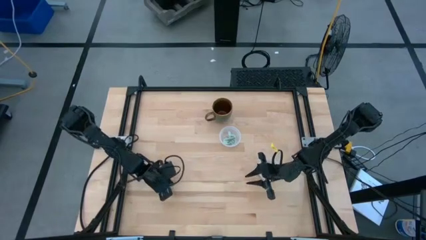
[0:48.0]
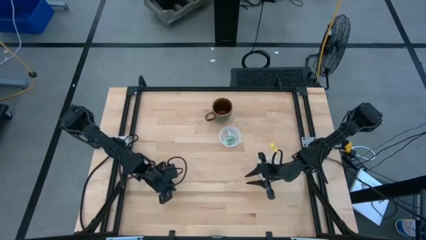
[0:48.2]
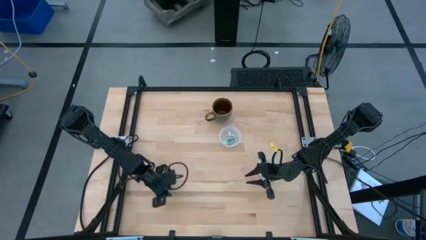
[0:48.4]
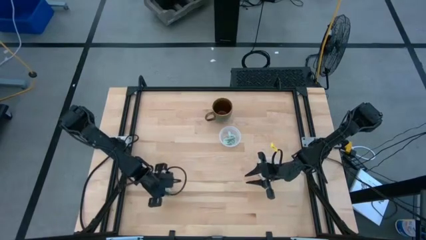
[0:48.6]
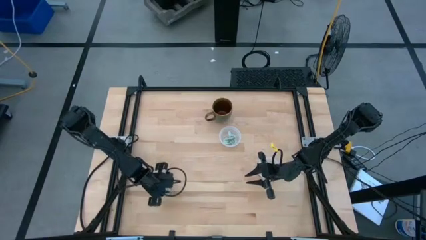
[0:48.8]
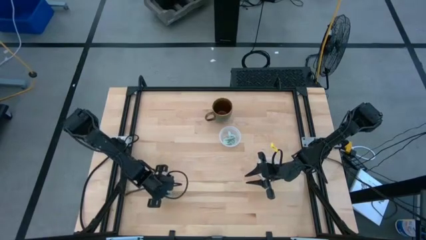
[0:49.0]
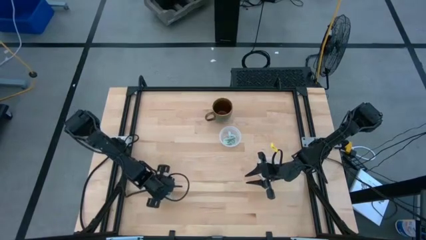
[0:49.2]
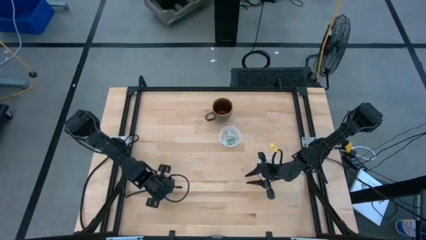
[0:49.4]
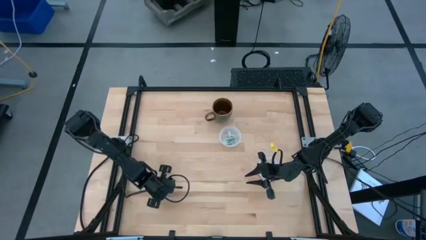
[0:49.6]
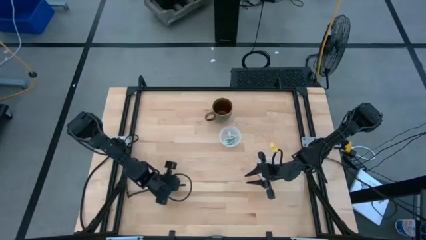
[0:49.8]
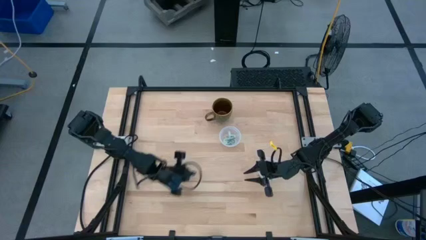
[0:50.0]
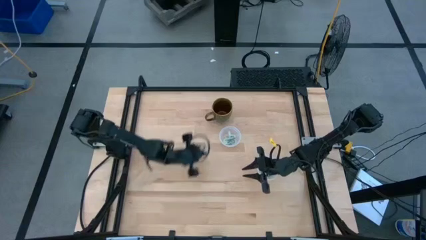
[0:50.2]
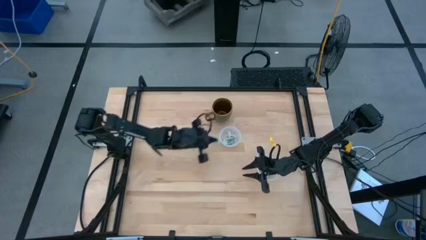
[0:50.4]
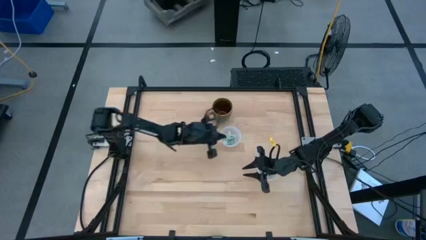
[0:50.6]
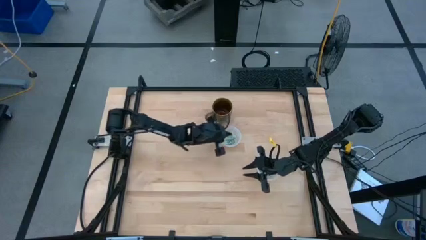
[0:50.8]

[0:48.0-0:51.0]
Task: Pick and place items into bin
Put the stevia packet into the top transparent bin

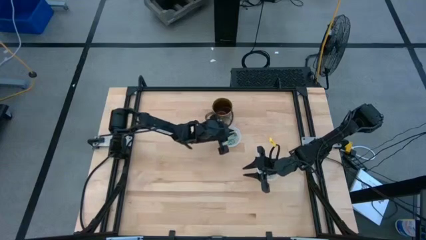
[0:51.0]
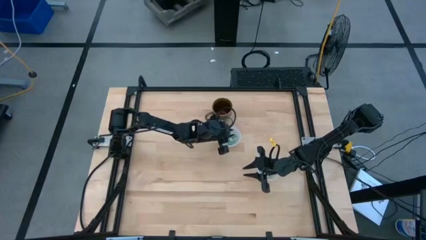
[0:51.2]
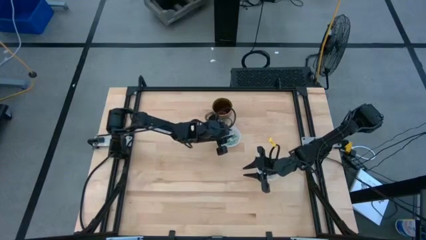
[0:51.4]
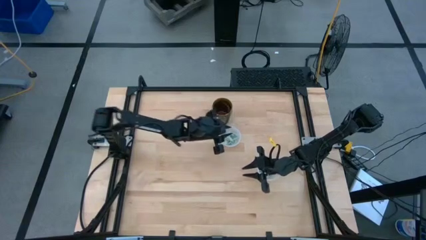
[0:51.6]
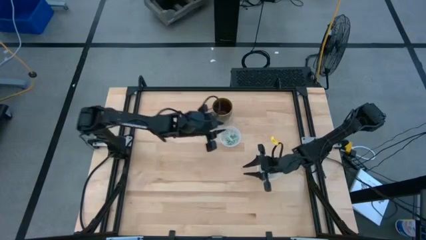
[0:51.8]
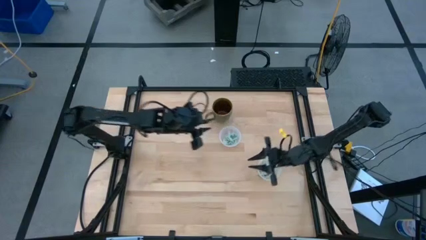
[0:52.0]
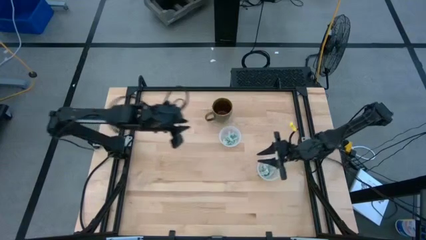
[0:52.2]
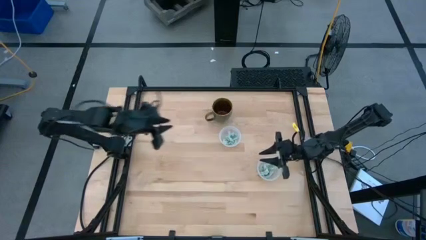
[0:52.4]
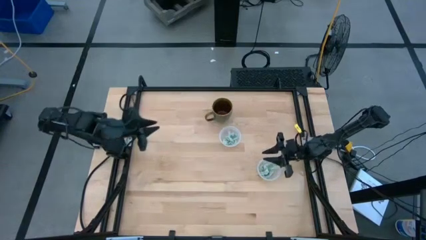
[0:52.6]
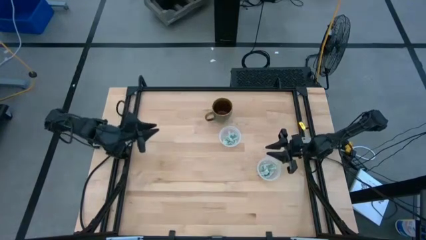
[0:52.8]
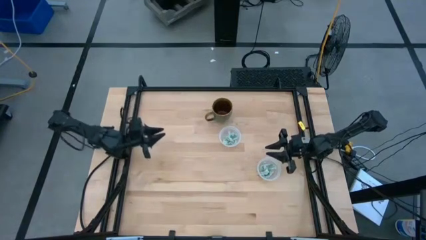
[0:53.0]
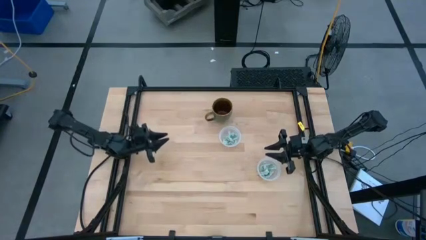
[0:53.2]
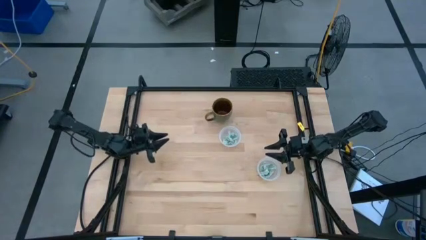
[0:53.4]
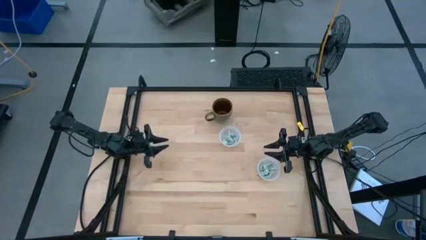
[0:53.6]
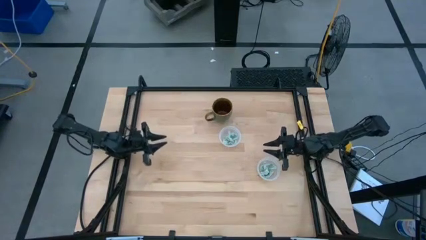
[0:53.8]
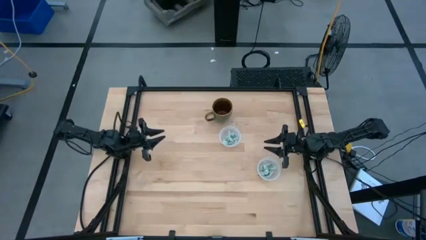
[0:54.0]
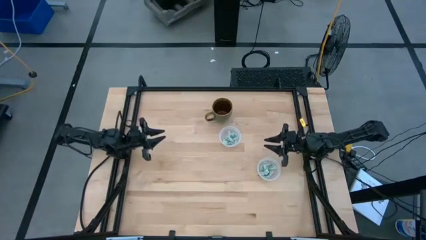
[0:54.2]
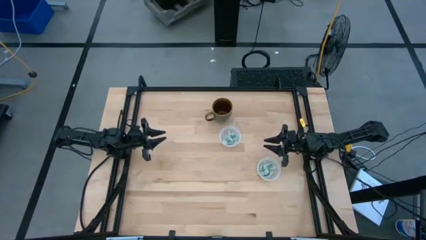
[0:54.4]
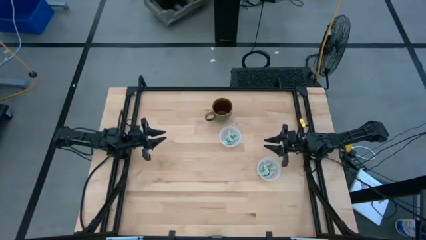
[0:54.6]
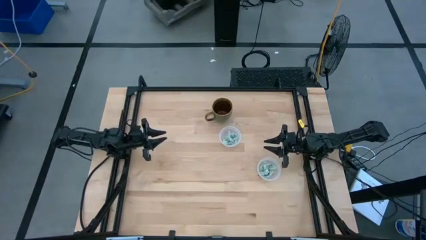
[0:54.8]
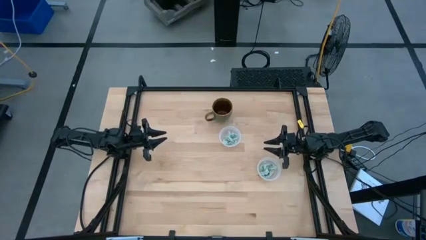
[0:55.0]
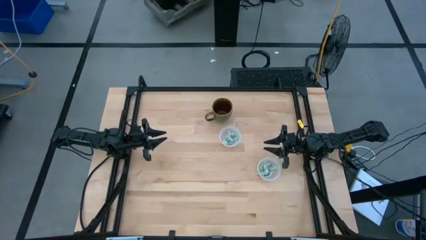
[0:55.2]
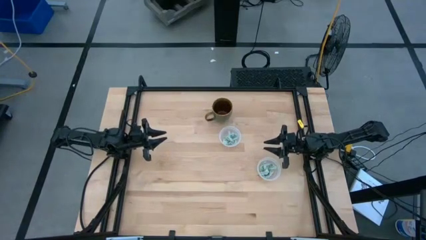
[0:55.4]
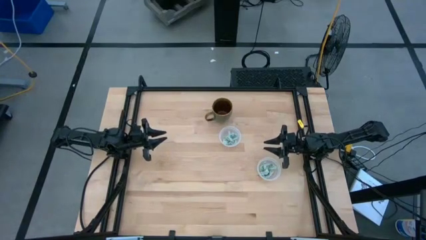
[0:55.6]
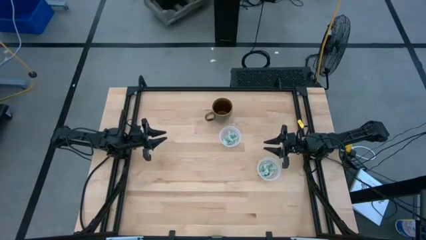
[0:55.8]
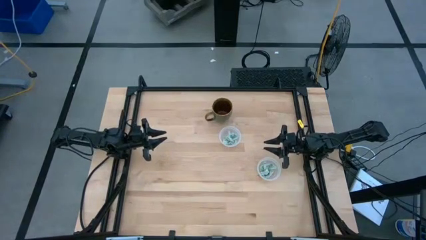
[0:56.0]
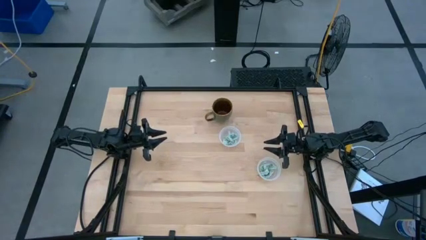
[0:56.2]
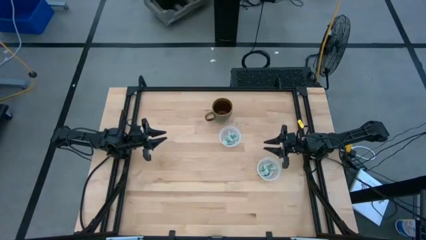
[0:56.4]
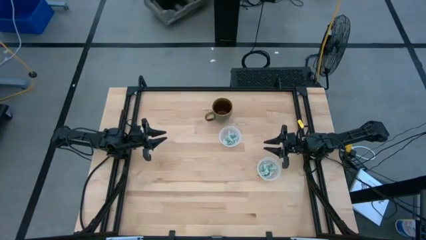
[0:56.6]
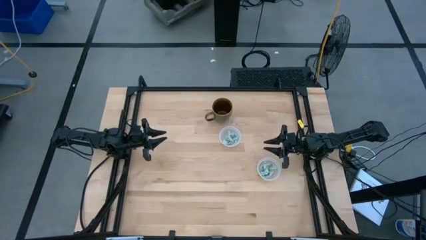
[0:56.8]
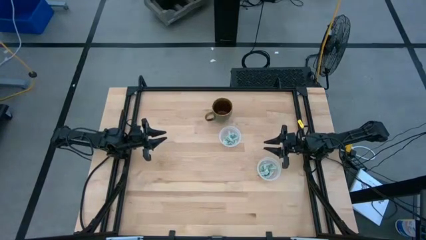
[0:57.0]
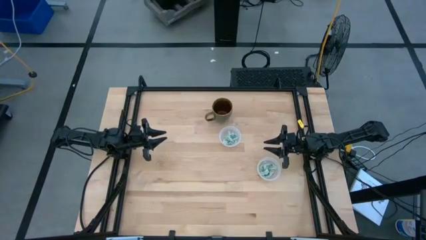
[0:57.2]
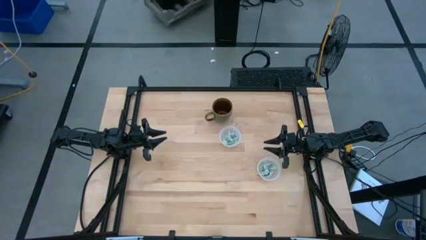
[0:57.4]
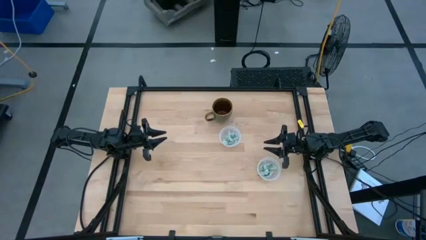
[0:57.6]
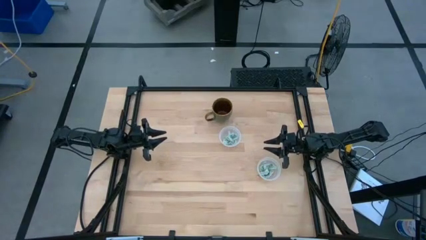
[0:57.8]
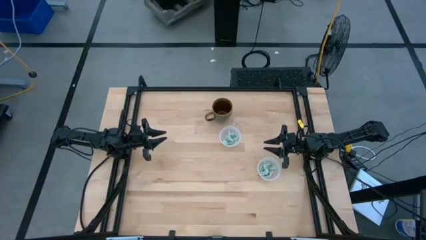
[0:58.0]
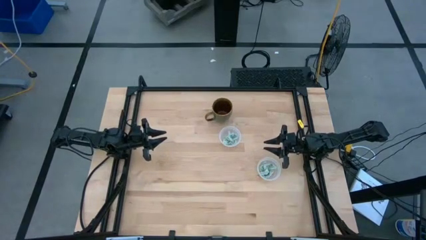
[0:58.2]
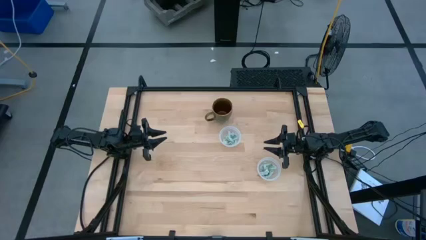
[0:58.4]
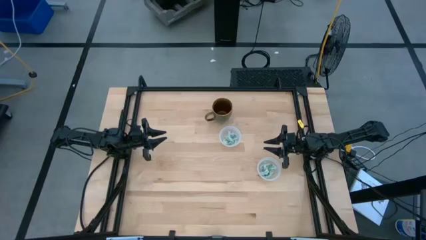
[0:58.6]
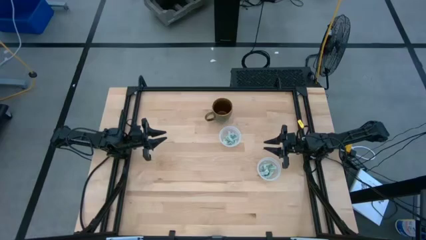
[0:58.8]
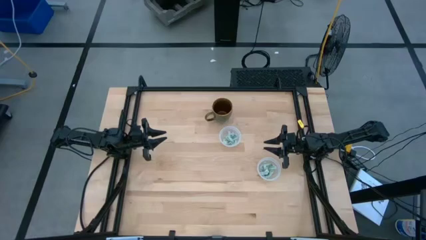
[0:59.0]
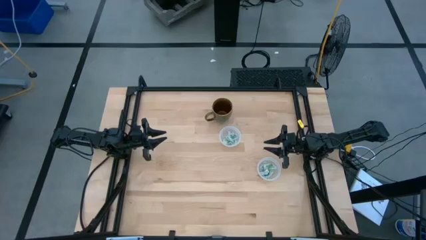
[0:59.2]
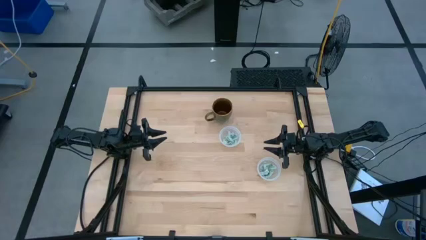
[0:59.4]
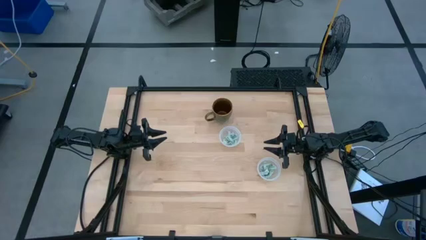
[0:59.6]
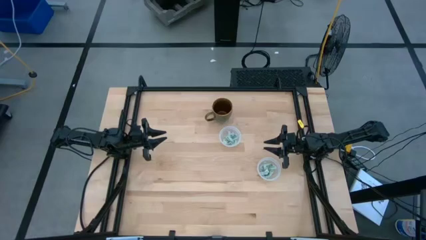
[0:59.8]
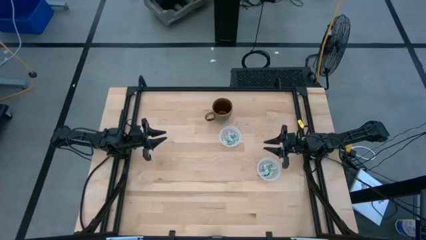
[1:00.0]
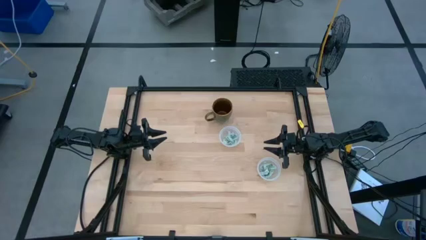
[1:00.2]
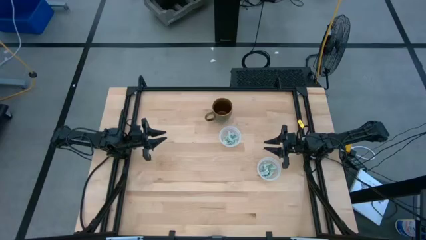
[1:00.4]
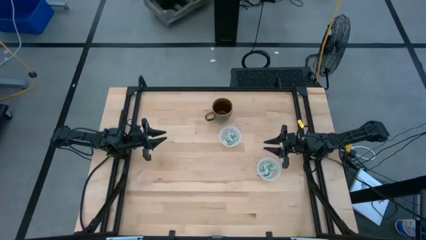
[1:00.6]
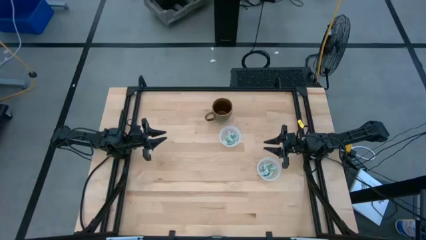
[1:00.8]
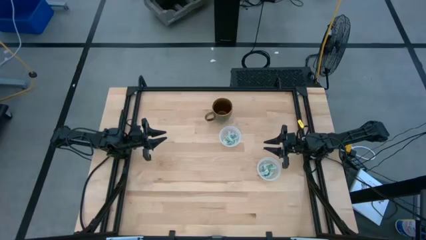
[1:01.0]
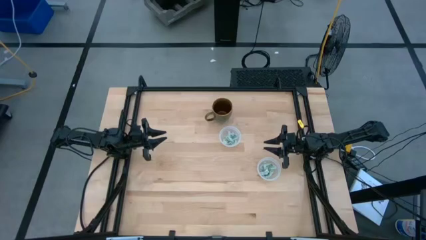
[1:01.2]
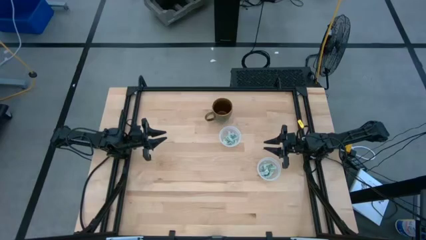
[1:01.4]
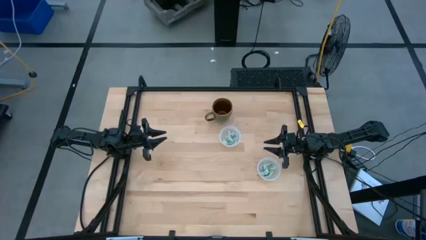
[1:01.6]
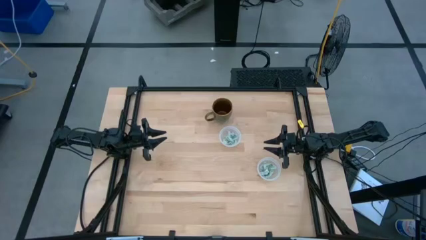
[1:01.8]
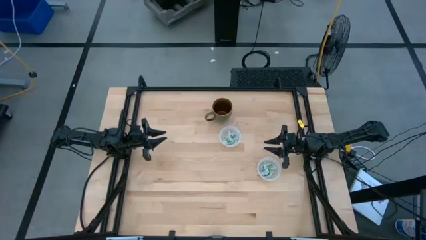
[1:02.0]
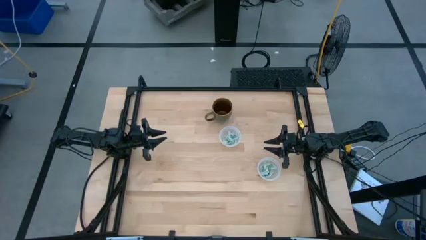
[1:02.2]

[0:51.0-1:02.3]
Return to Home Position

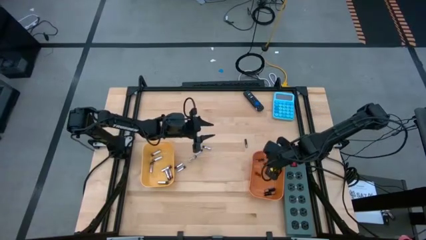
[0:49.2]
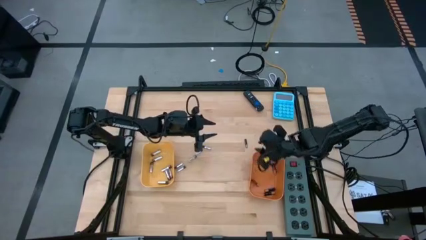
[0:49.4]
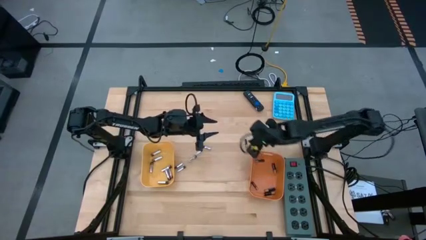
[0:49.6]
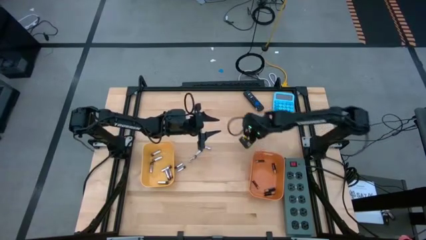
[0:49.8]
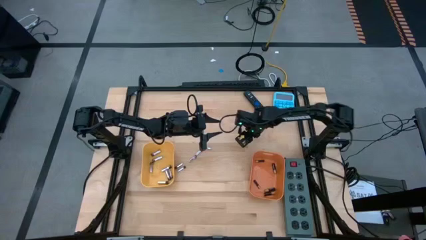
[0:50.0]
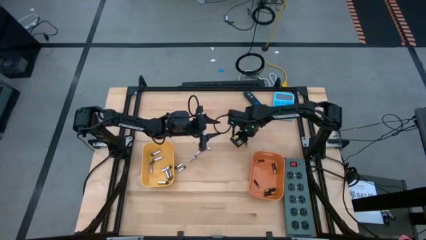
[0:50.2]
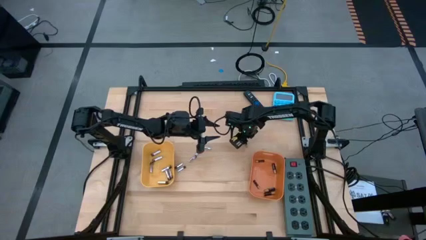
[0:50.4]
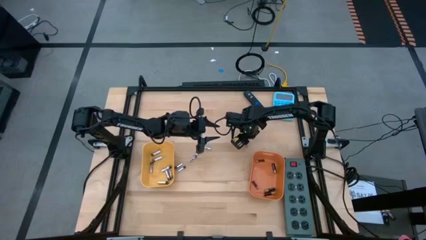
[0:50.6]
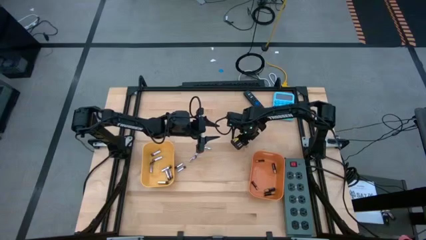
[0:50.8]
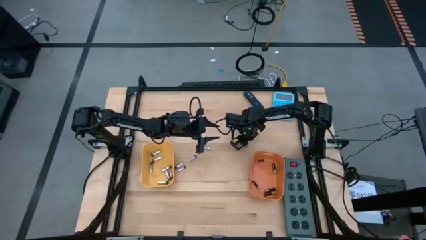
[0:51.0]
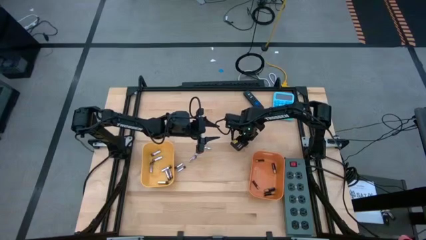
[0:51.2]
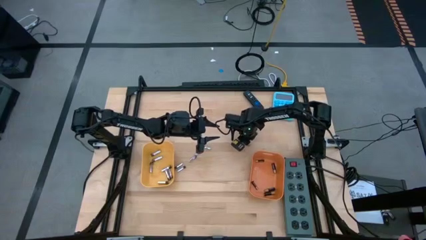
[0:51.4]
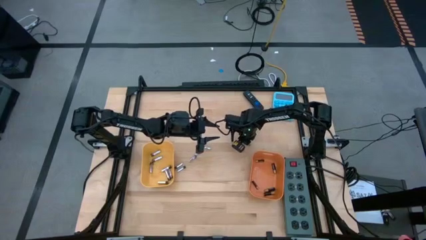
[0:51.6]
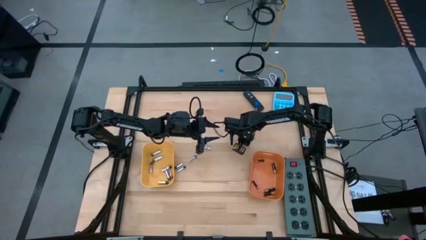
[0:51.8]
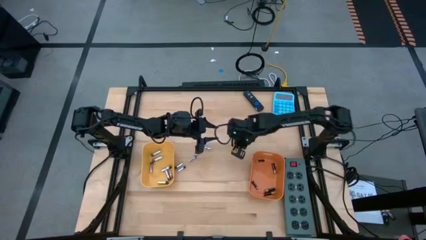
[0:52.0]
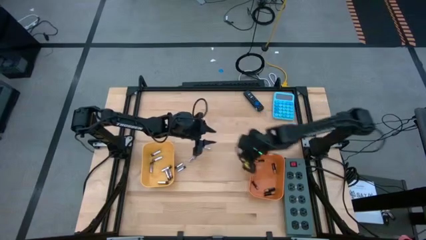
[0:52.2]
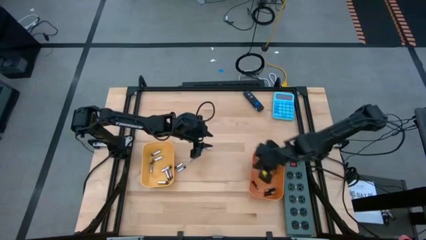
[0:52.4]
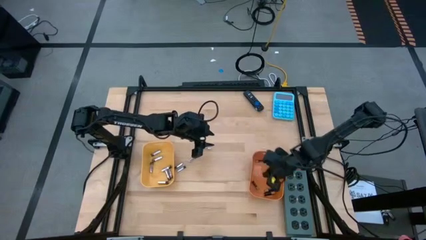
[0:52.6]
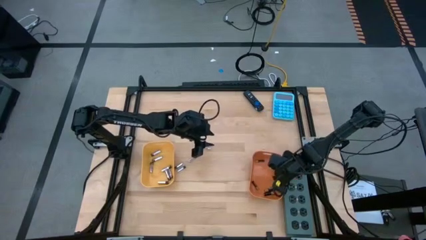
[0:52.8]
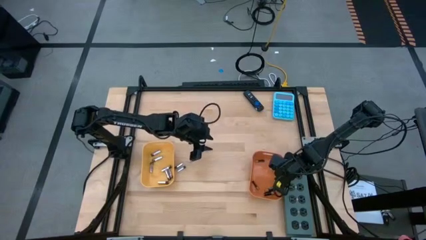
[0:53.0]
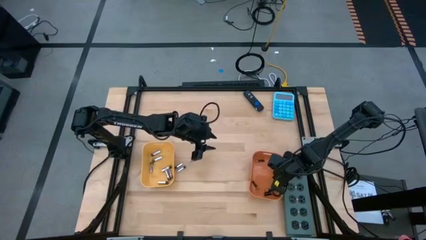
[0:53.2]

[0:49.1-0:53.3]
Task: Sort batteries
Put the black battery into the orange bin
